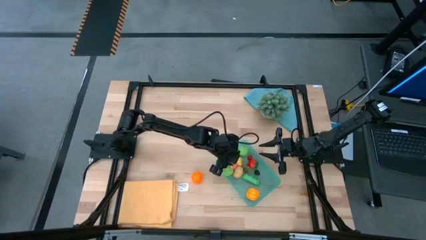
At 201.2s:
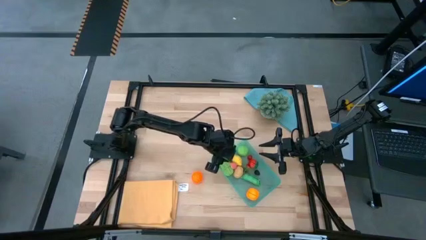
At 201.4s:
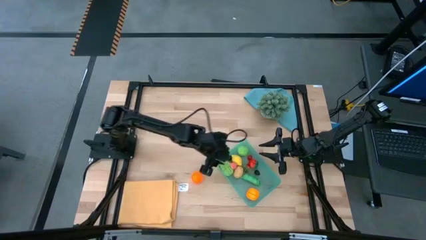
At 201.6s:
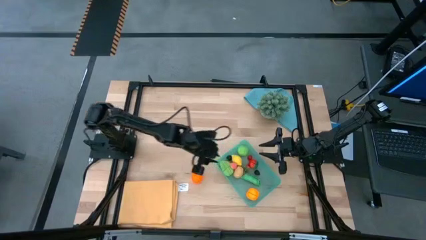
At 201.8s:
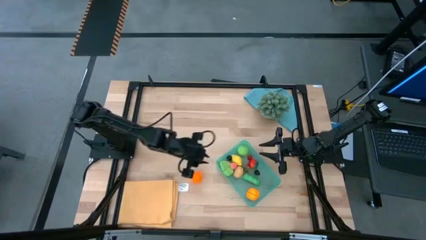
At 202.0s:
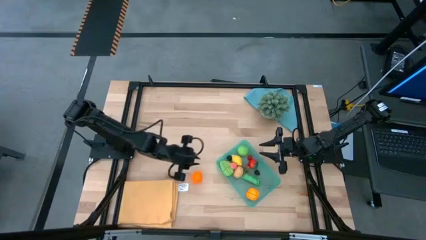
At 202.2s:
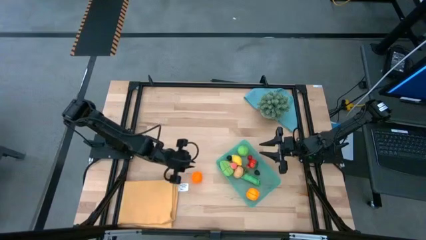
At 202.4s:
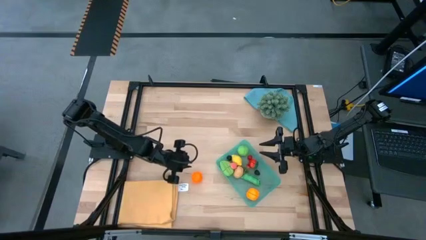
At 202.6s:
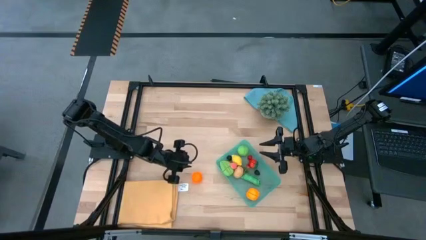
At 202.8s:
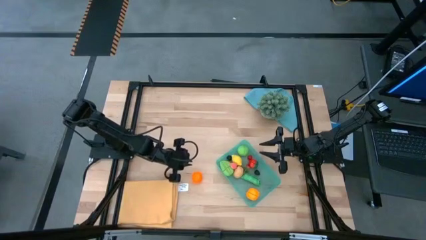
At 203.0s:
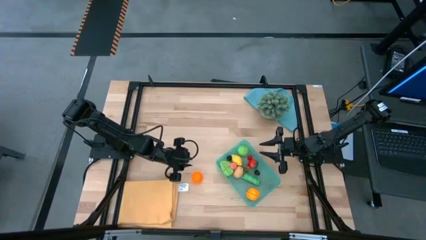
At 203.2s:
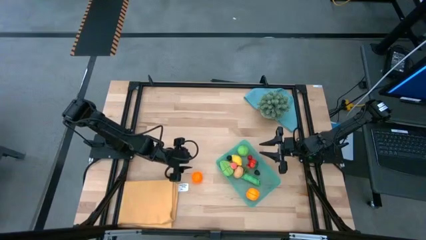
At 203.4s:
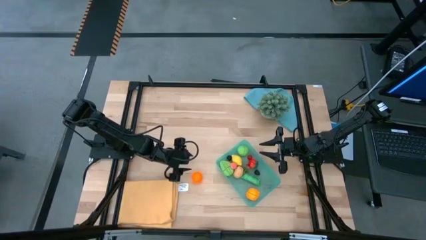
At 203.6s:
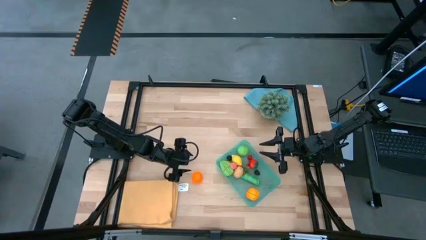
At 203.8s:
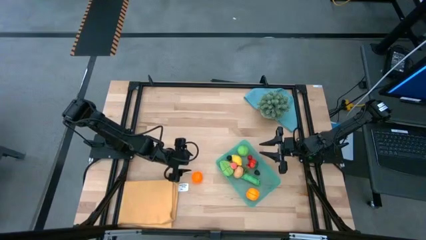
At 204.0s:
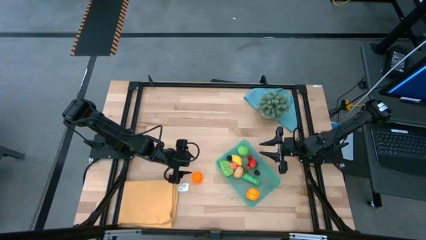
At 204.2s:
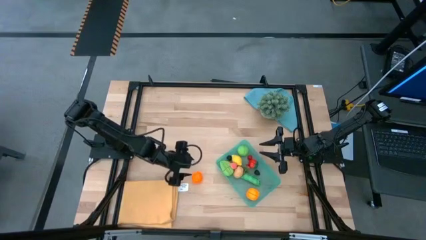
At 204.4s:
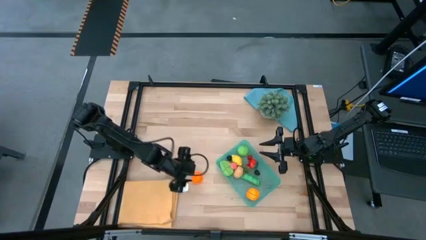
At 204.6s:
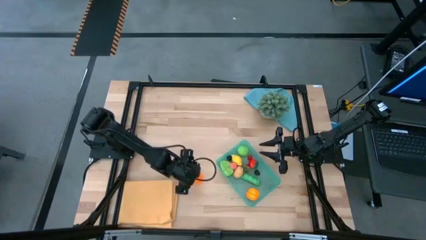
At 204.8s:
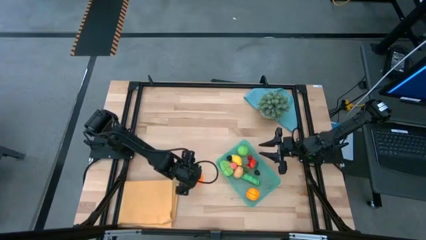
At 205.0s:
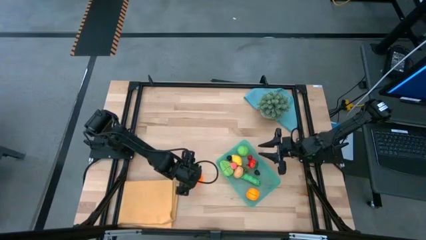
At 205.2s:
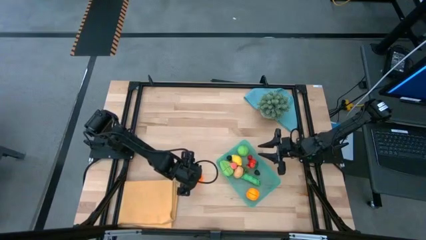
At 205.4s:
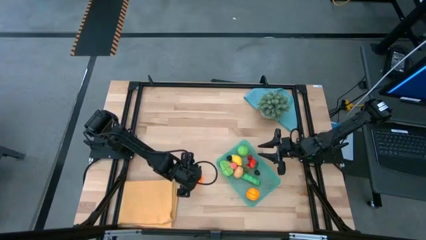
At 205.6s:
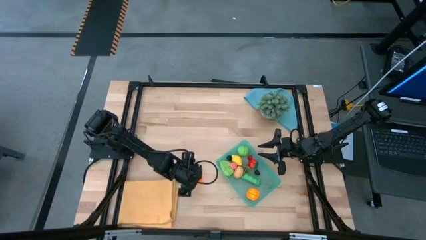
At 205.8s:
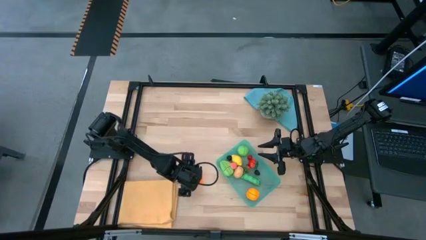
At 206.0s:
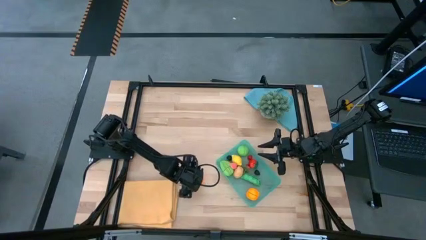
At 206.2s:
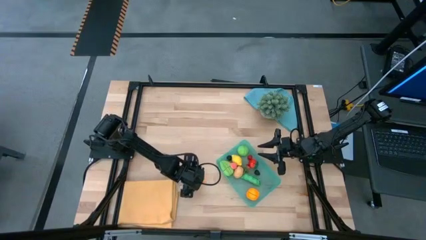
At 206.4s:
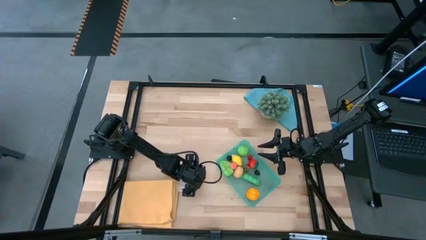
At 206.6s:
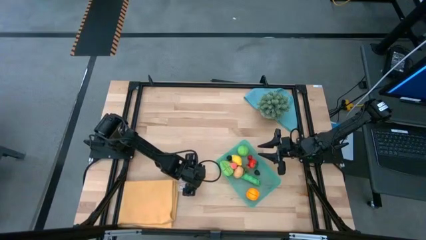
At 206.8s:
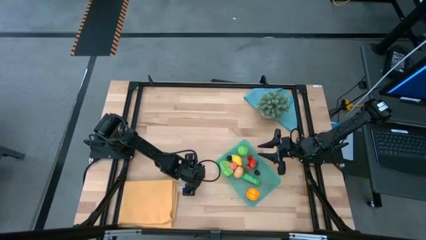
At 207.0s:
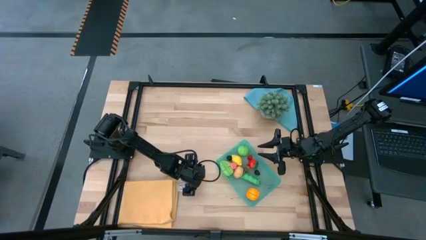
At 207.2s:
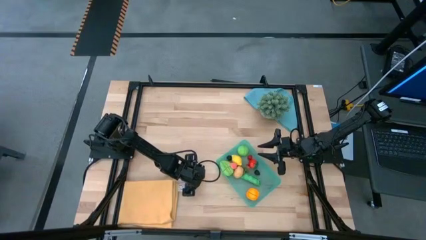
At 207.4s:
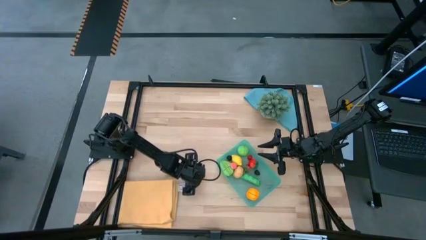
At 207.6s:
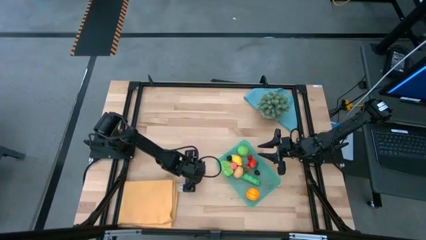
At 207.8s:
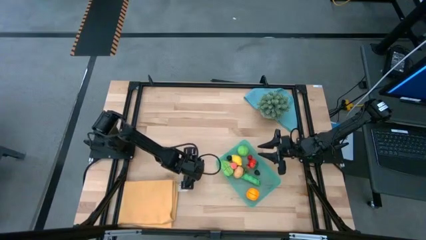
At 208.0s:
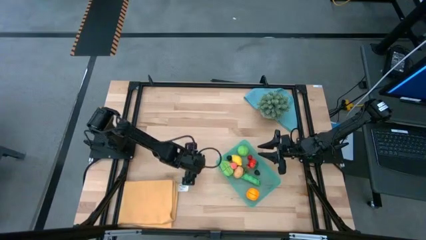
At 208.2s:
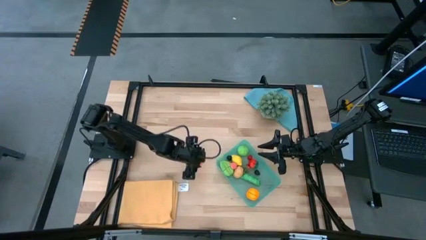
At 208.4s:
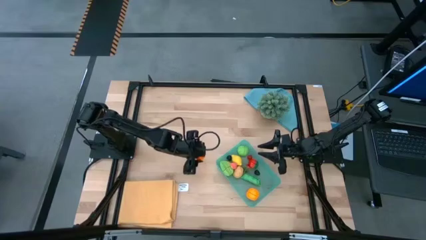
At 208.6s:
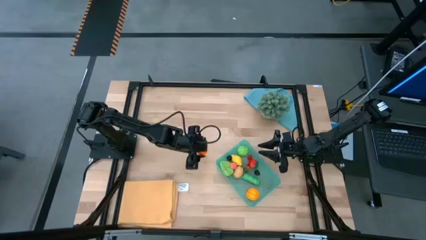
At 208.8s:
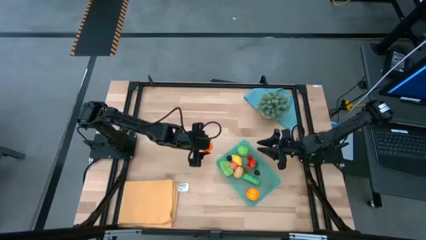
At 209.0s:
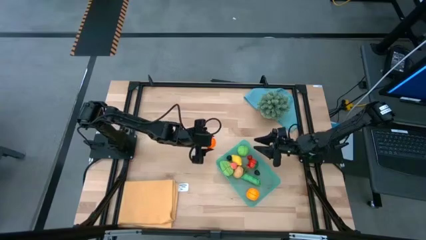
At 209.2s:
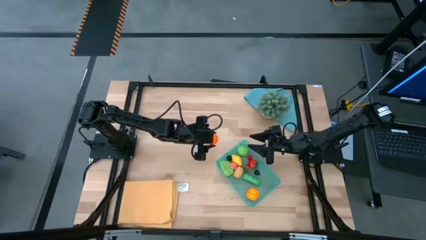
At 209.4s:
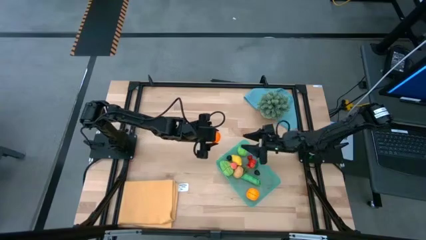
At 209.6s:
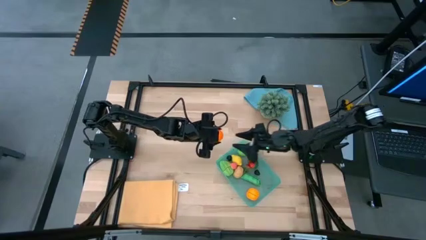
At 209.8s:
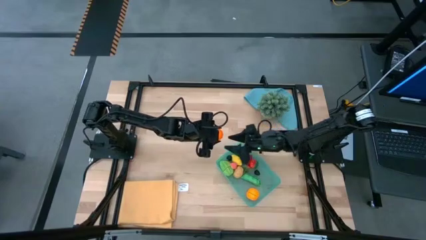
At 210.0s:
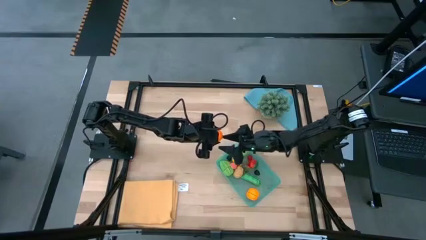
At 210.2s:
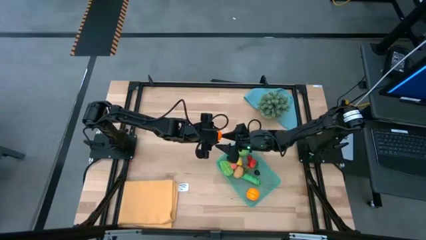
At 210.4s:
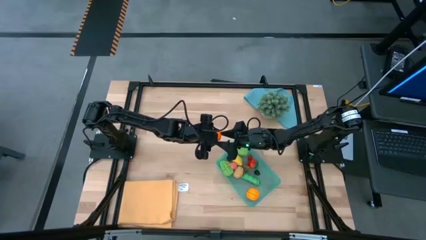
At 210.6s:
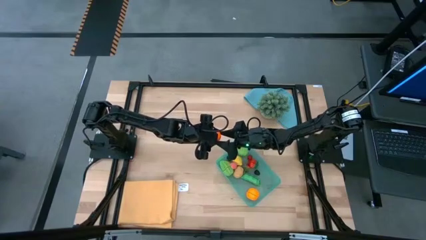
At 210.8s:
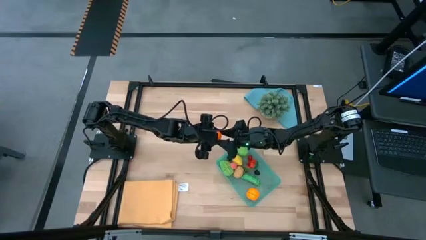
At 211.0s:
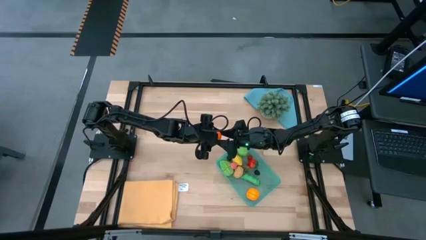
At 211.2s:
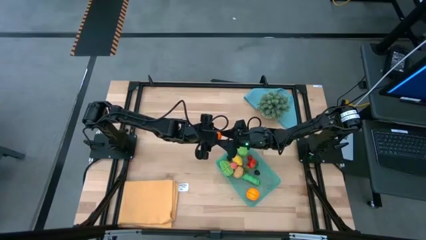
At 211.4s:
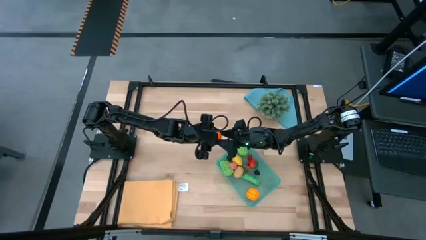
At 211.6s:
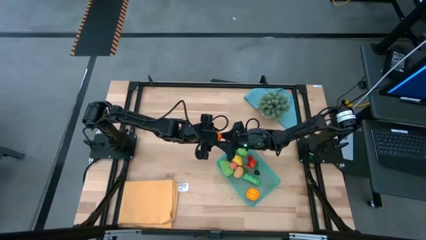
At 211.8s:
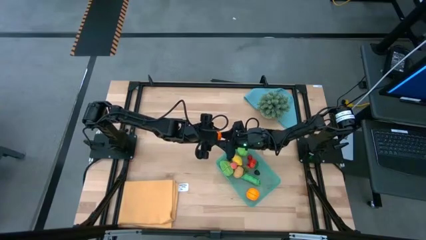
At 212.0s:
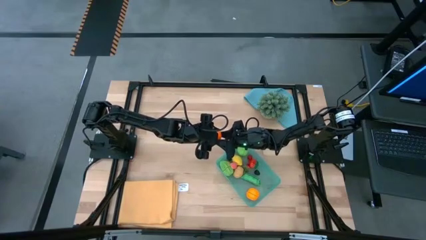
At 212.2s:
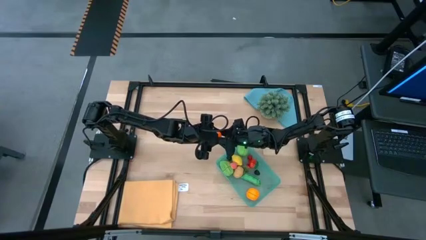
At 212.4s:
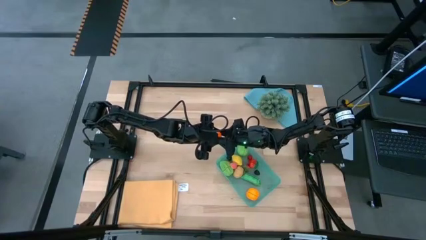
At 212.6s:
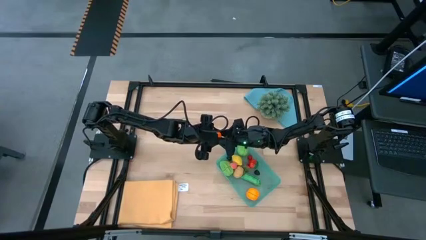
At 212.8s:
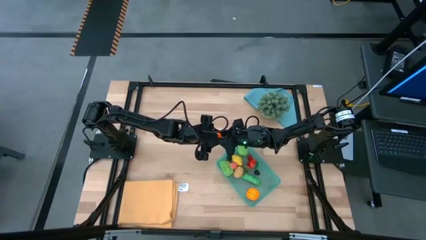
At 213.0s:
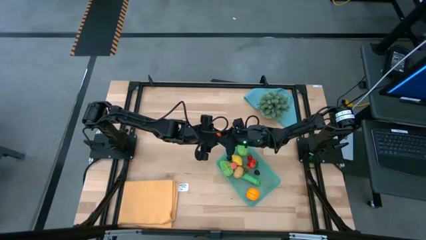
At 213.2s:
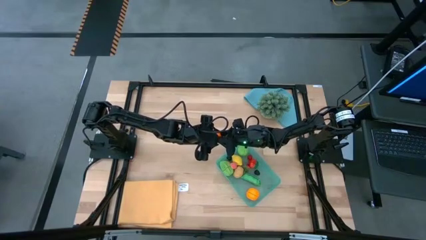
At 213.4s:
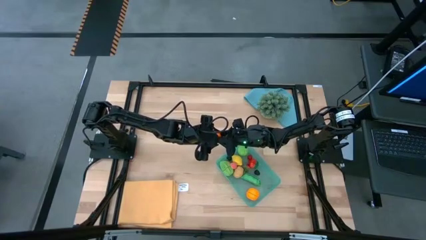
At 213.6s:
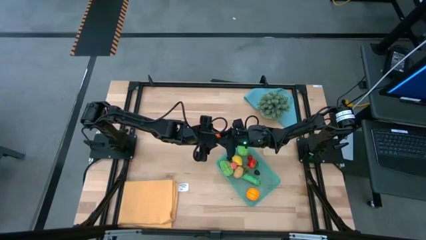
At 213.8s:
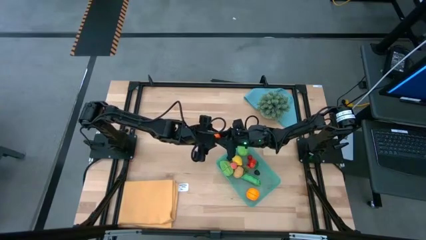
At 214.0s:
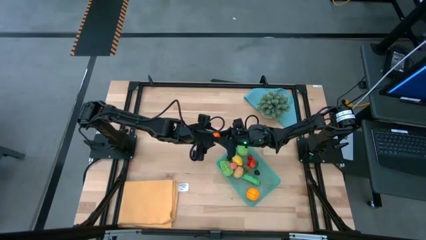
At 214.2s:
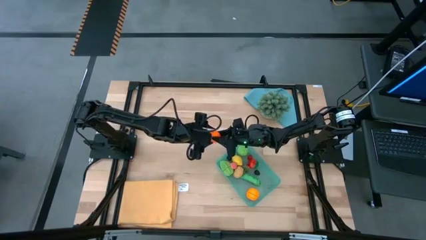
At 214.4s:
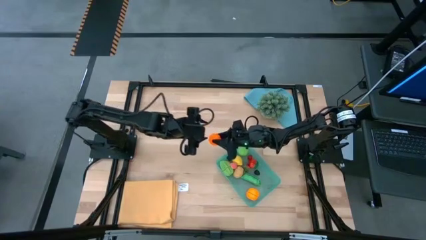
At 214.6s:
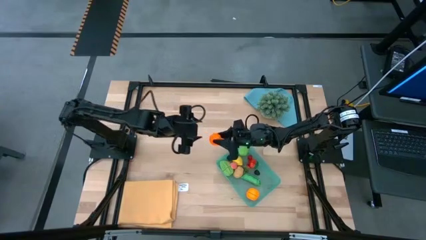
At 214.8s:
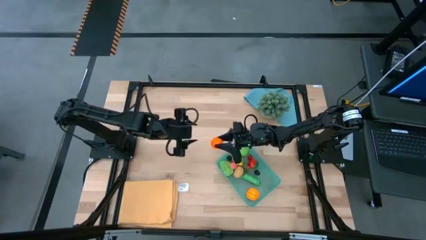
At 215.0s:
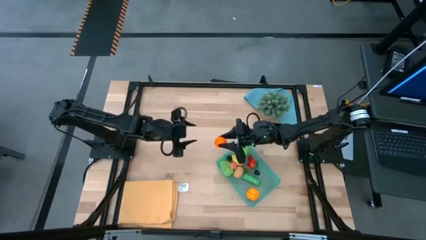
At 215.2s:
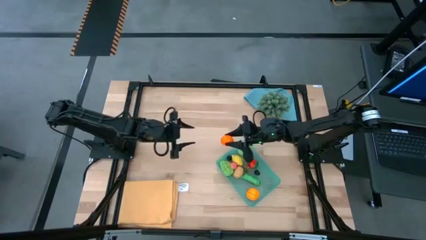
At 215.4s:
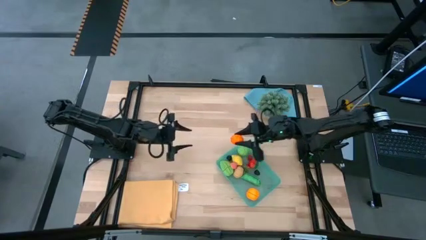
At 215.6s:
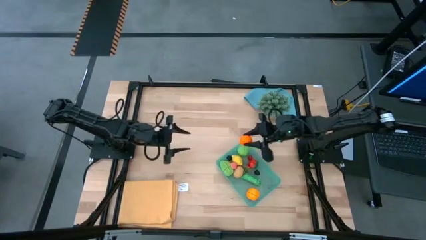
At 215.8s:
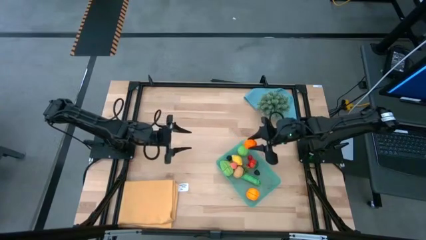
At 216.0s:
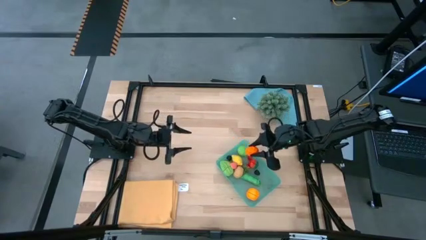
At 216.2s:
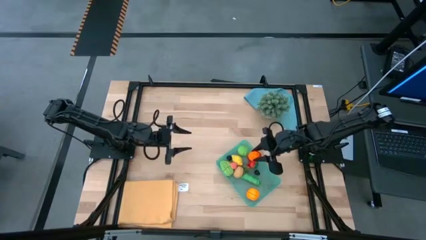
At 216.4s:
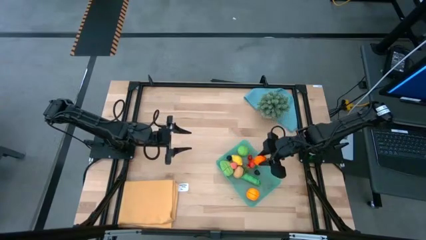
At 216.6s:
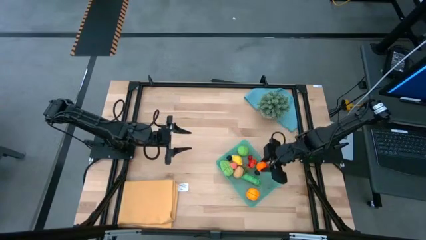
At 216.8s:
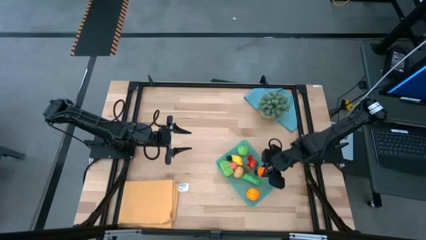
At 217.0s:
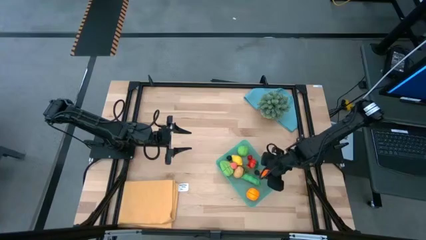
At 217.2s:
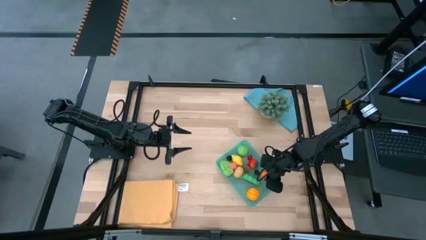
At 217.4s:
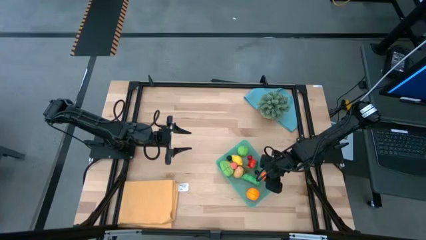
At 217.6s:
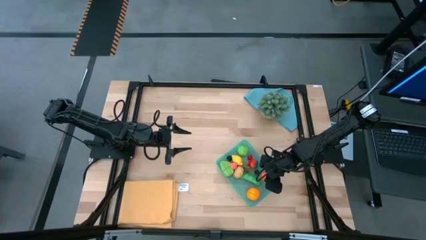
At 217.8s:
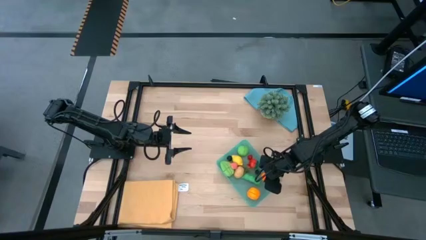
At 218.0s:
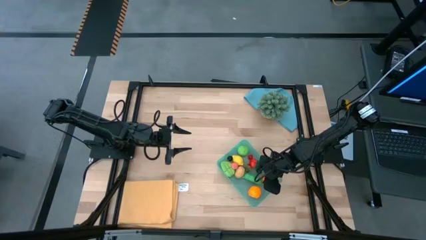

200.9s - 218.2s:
Task: Pick and placing Produce into tupperware
Put the tangerine into the green bin

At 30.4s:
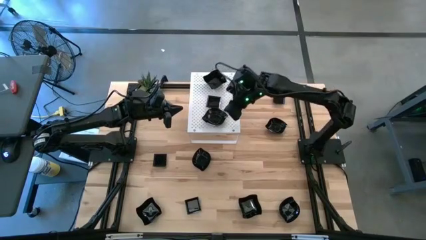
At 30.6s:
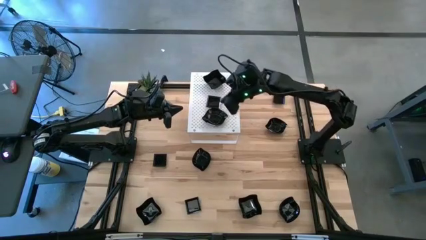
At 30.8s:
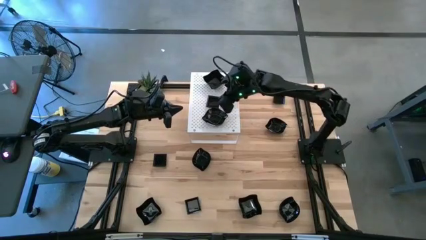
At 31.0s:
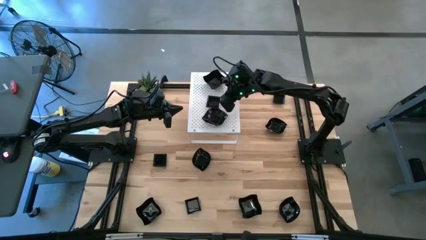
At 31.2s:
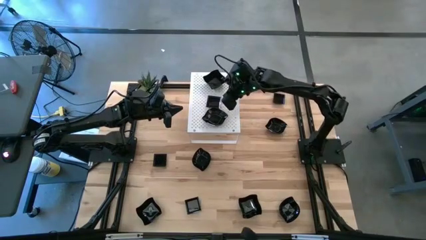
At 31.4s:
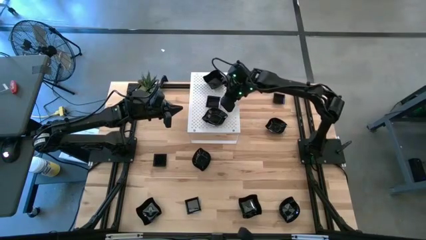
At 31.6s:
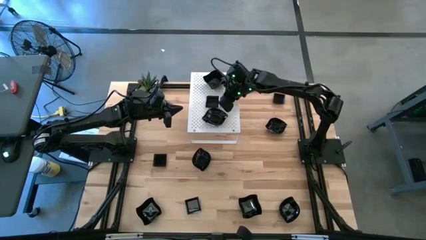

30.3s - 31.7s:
Task: Pick & Place Mini shaped plates
Adjust the black square plate on the shelf
